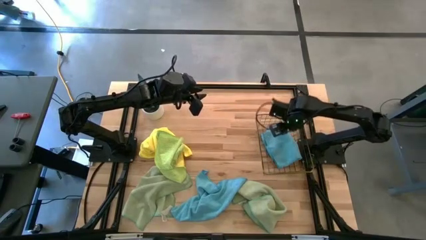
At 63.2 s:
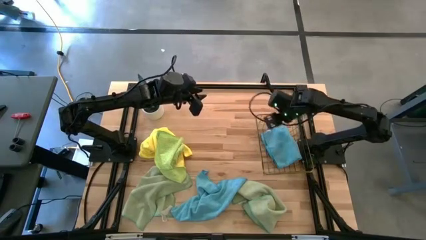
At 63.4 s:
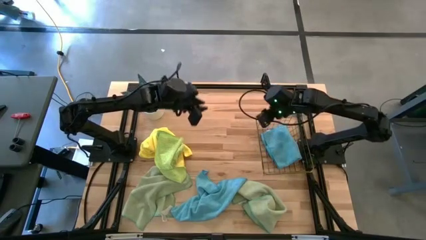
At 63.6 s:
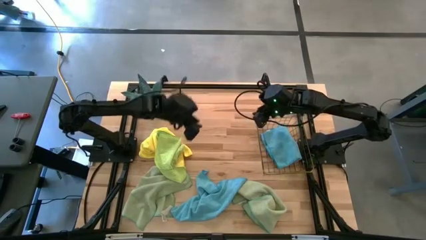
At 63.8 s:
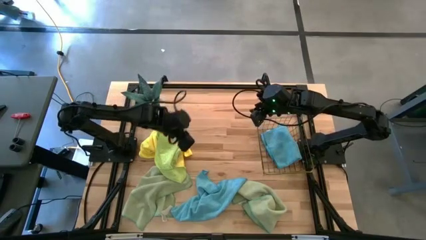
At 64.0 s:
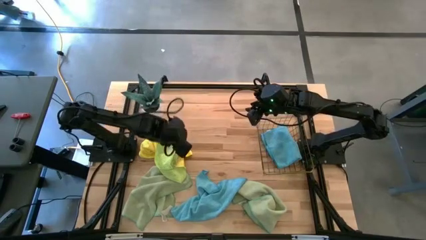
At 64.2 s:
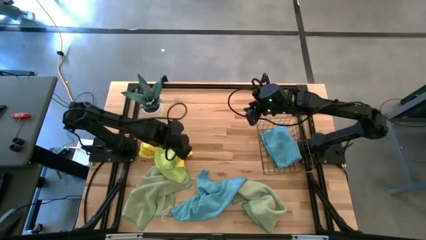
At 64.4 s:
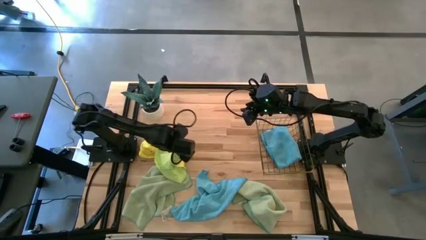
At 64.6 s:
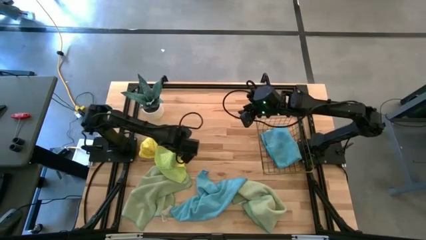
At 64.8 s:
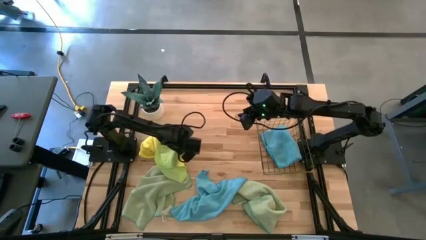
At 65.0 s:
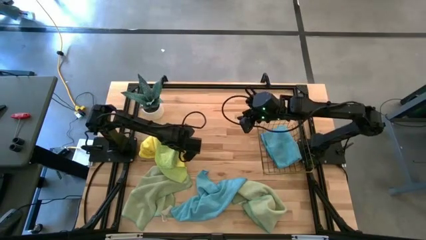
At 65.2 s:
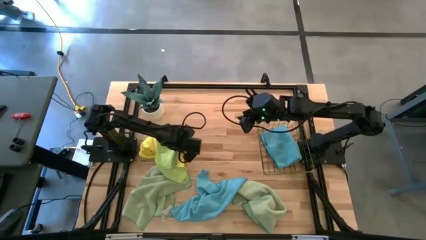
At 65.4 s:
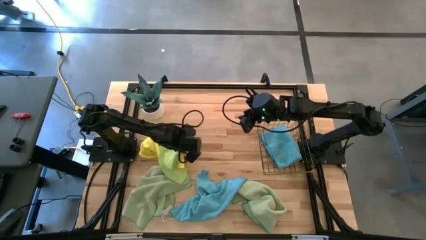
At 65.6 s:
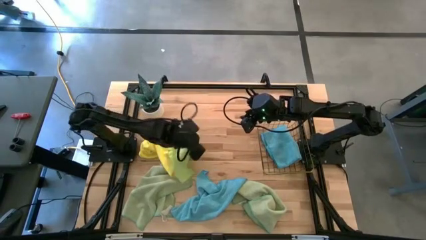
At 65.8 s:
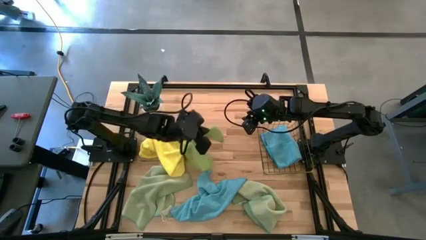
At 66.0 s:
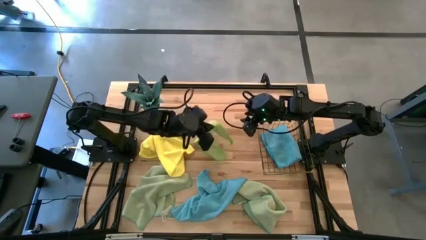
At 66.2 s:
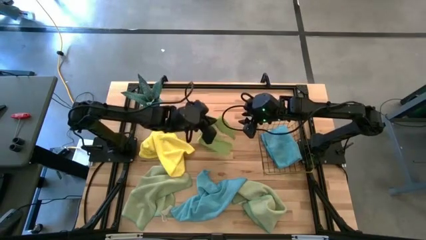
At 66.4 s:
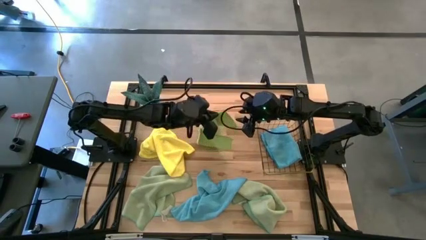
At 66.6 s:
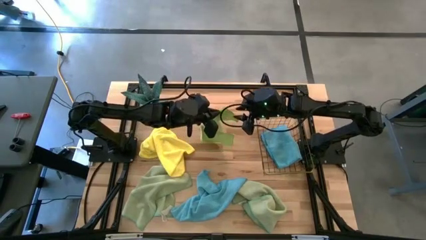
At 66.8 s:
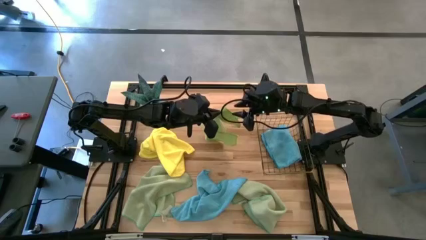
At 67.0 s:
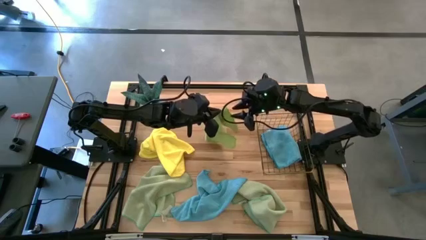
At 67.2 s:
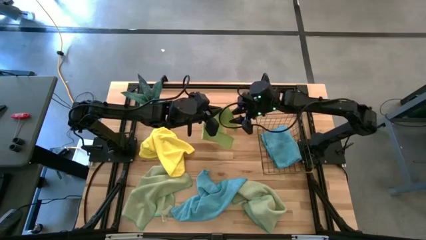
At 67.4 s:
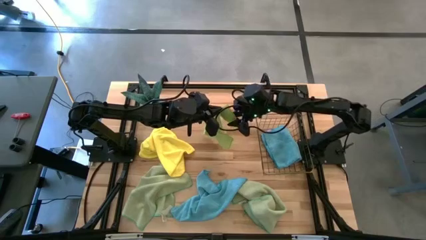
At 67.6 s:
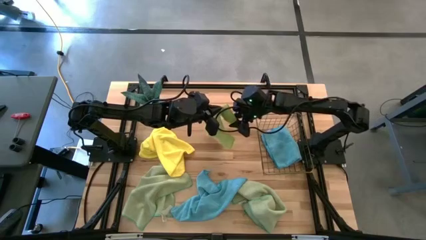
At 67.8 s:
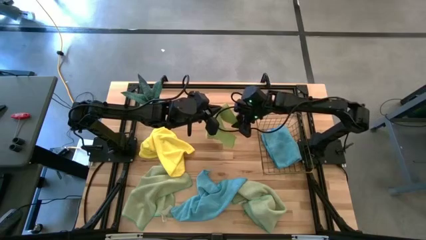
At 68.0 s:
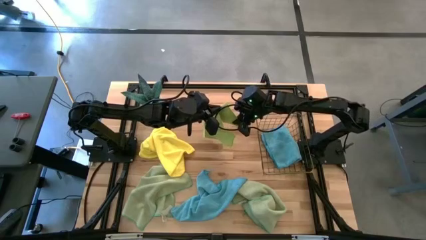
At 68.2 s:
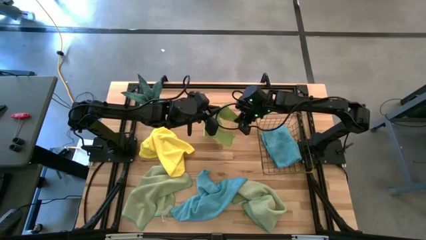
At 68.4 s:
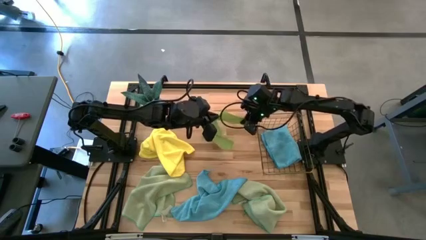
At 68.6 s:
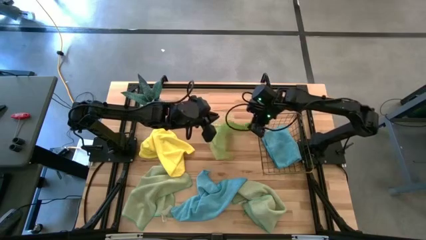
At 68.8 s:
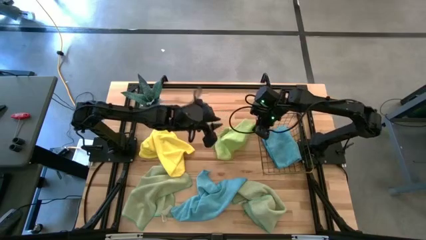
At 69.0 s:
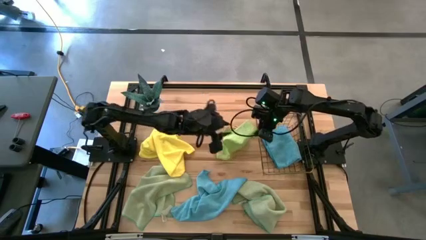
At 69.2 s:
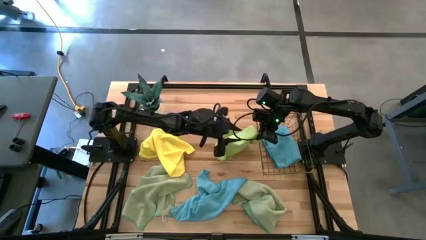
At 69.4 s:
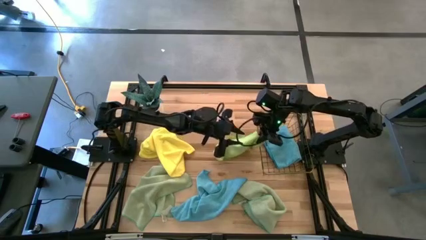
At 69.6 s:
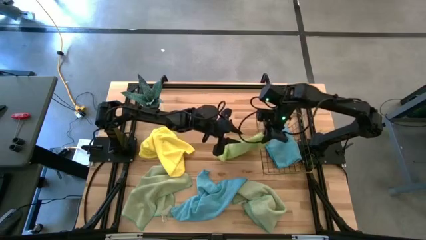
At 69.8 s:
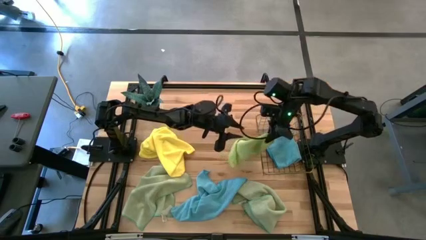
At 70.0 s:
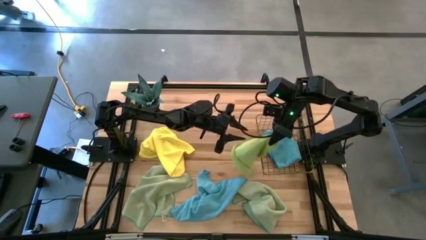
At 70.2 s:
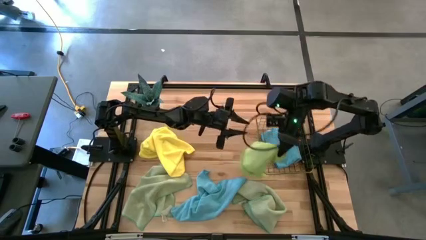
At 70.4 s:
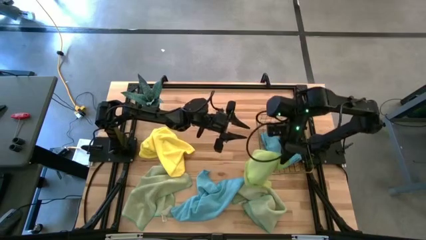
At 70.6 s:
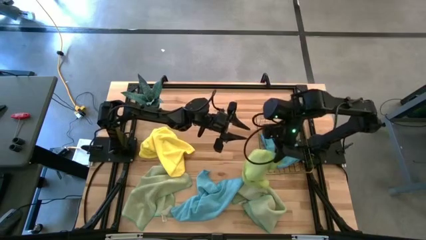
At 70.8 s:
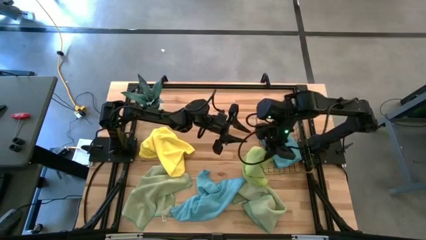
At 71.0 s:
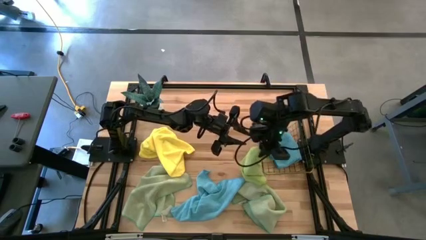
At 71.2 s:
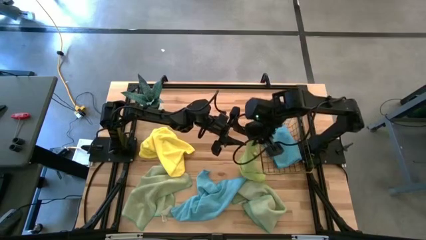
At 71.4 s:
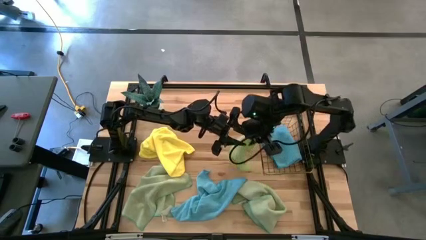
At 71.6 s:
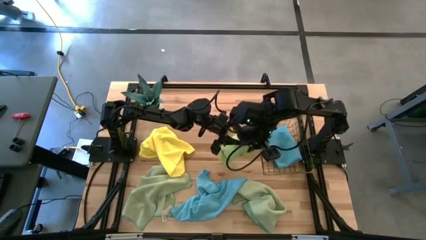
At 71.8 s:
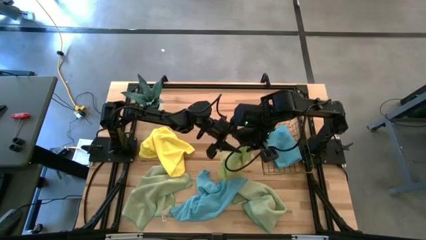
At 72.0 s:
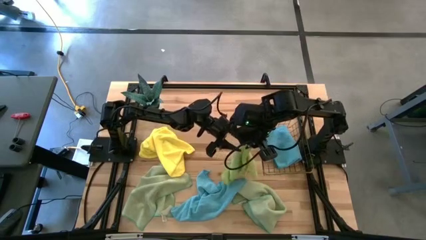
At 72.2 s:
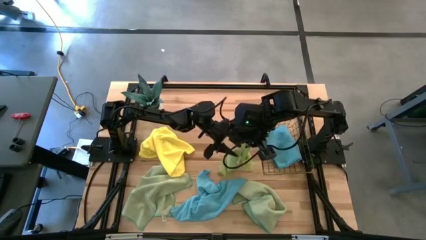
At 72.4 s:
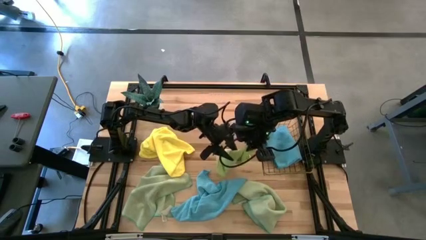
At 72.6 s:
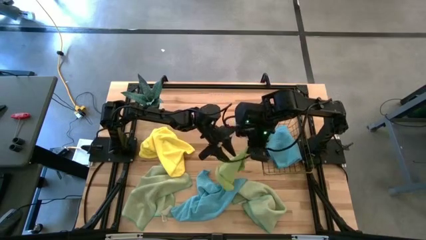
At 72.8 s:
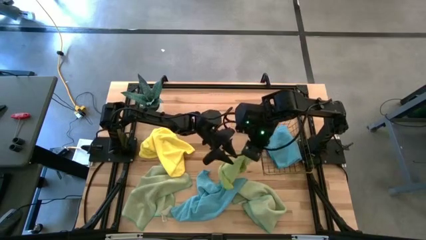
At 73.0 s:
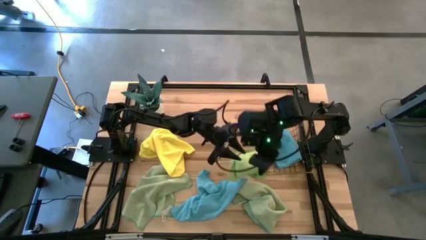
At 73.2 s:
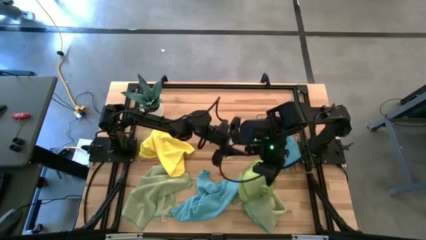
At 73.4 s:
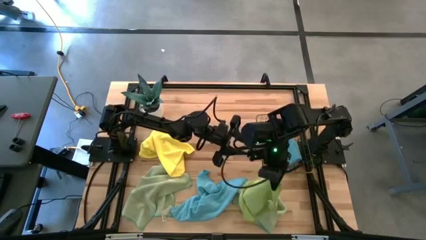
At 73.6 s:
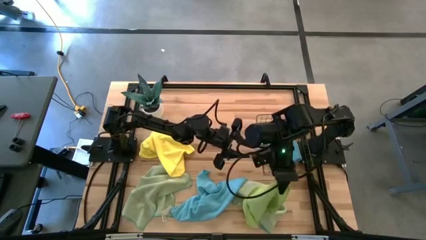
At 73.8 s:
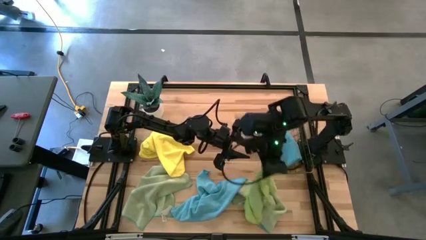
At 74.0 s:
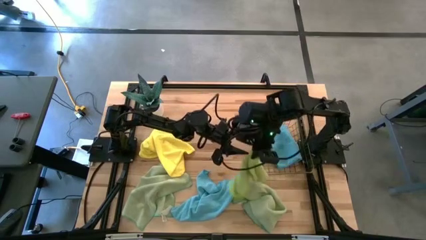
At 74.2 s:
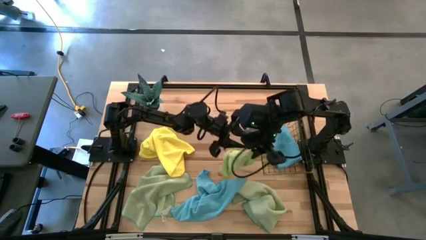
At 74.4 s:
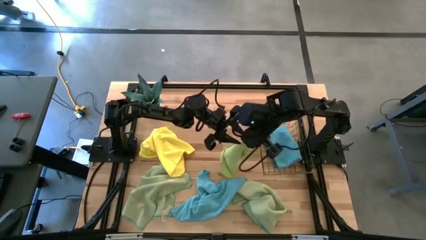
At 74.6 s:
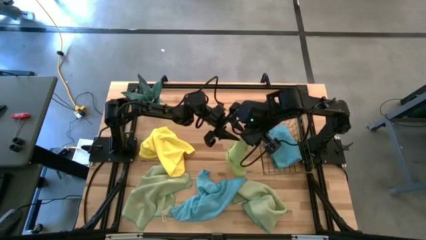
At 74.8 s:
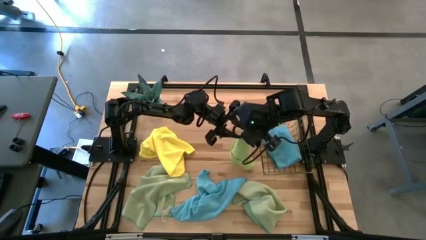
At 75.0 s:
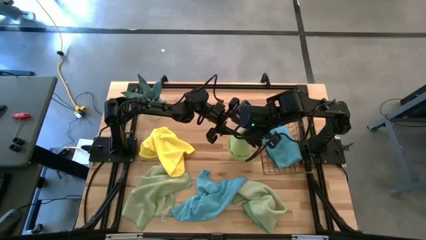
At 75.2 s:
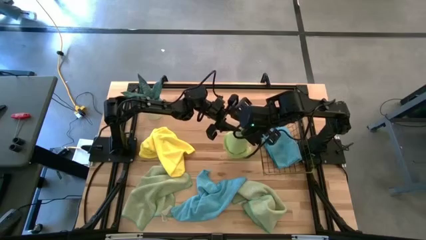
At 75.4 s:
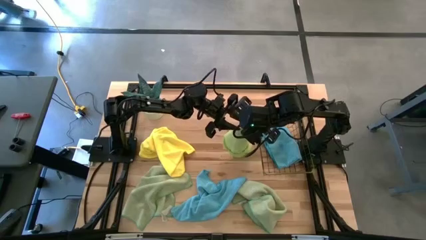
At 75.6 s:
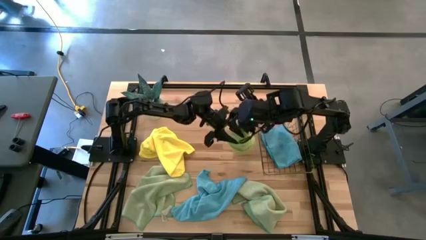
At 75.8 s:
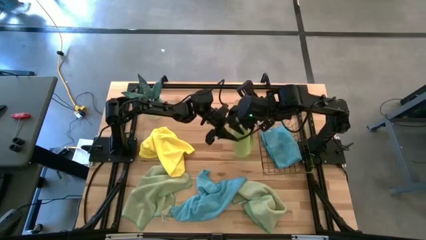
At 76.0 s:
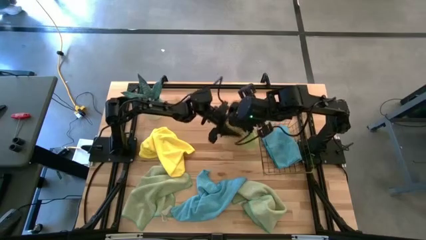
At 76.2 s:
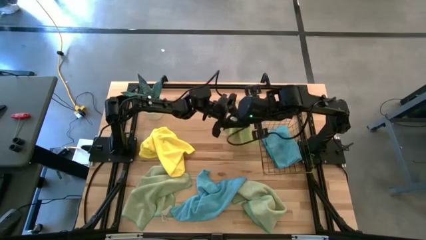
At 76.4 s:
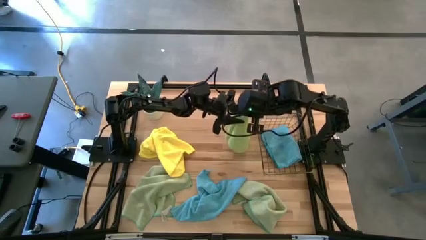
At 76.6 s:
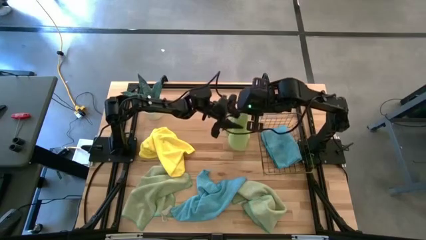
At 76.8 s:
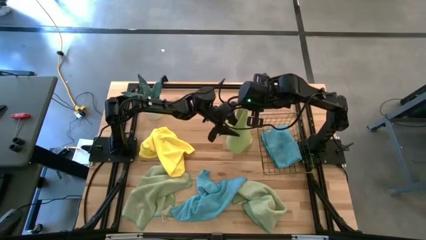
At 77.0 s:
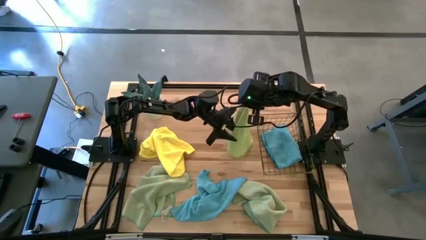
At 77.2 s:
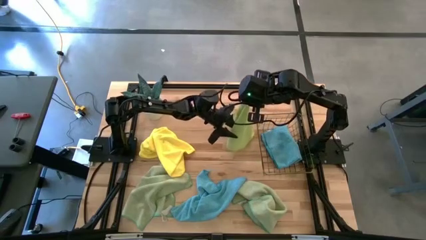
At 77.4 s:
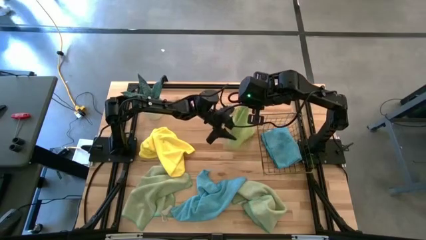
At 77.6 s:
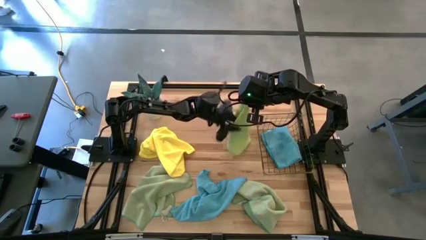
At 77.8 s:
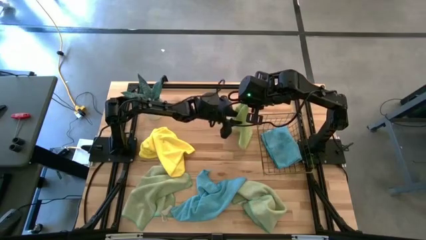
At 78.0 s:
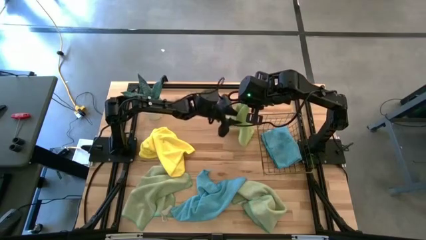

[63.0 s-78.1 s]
Task: Fold microfiber towels
Fold the light green microfiber cloth
